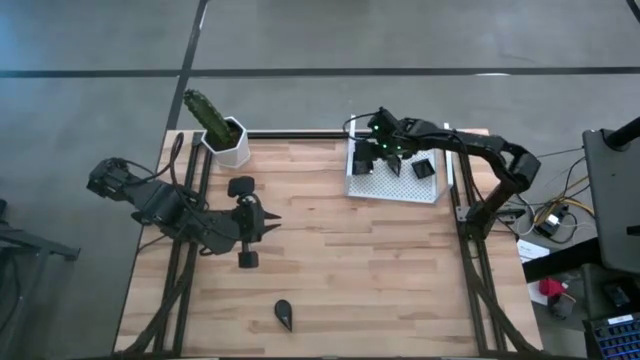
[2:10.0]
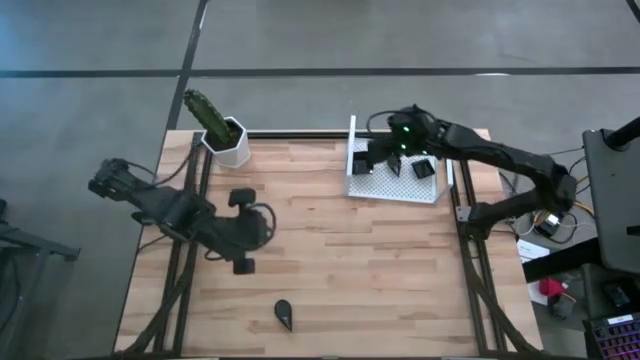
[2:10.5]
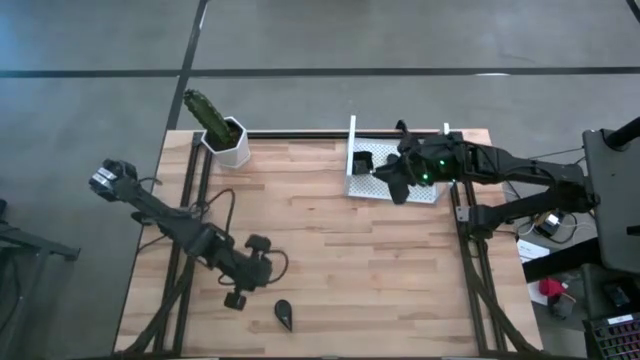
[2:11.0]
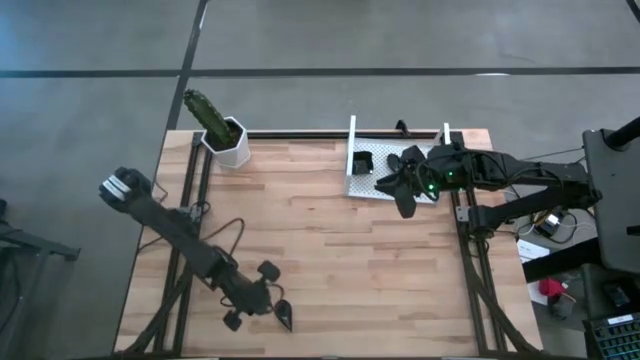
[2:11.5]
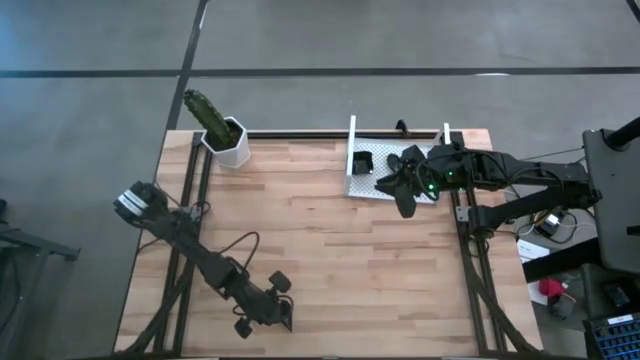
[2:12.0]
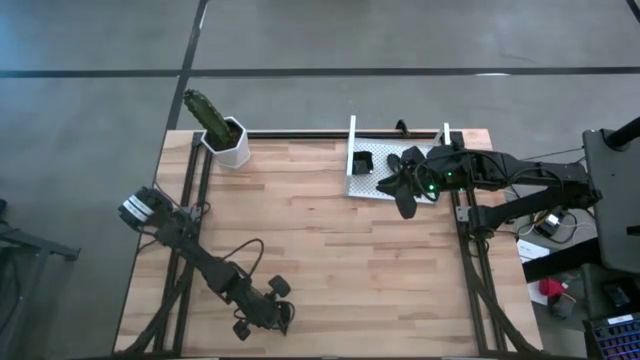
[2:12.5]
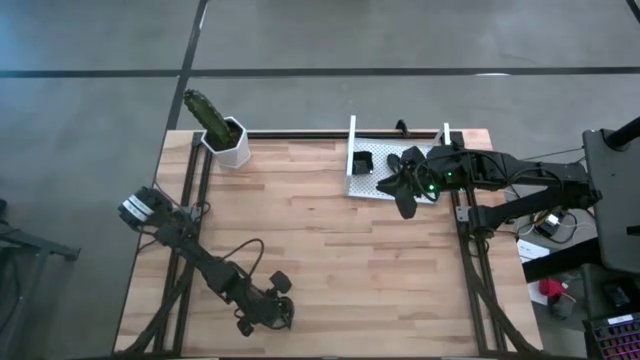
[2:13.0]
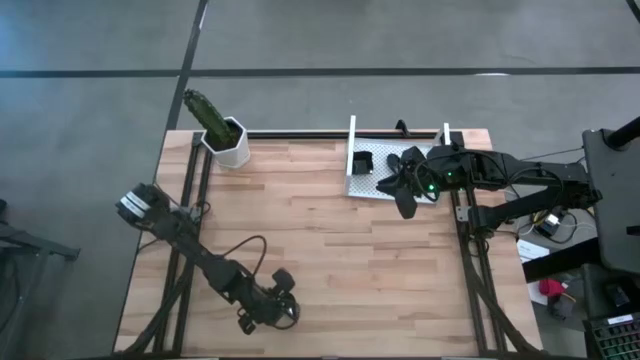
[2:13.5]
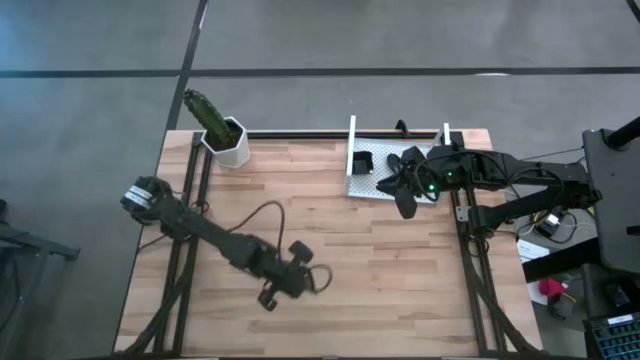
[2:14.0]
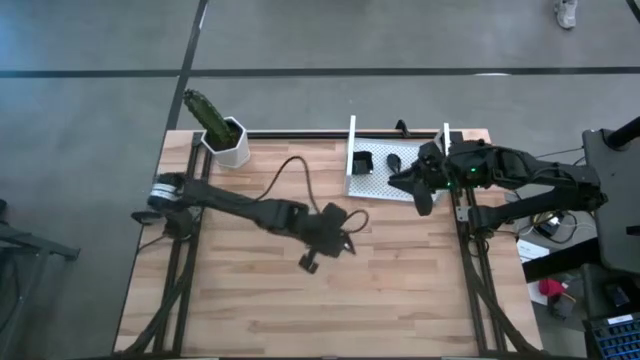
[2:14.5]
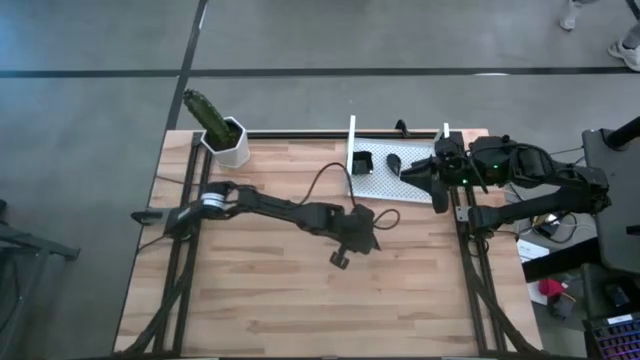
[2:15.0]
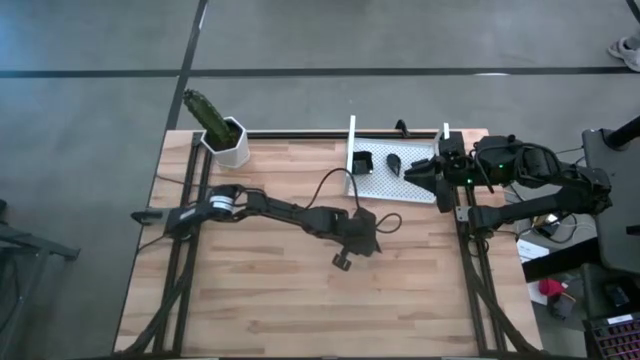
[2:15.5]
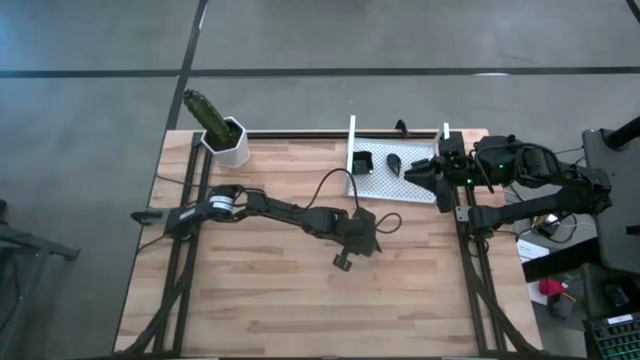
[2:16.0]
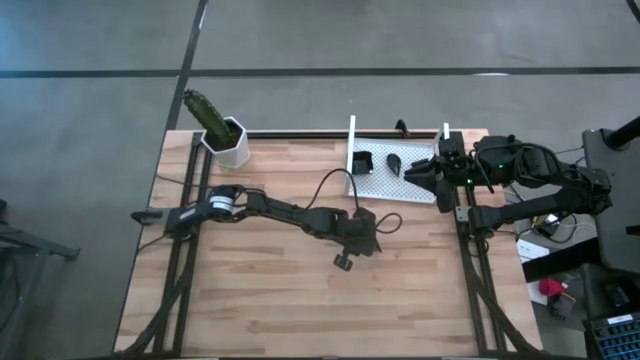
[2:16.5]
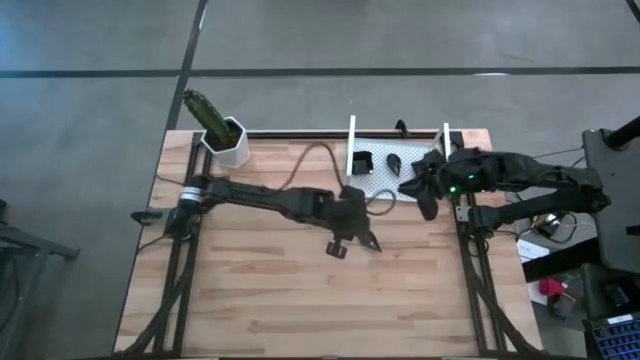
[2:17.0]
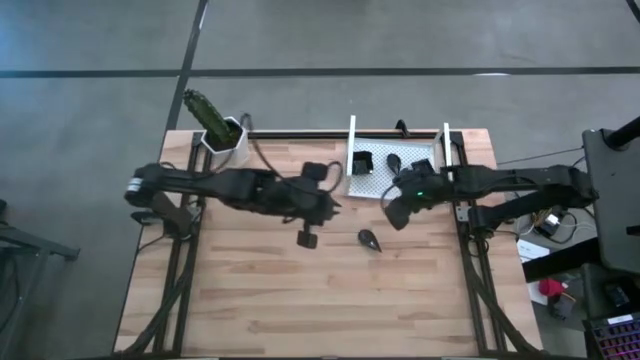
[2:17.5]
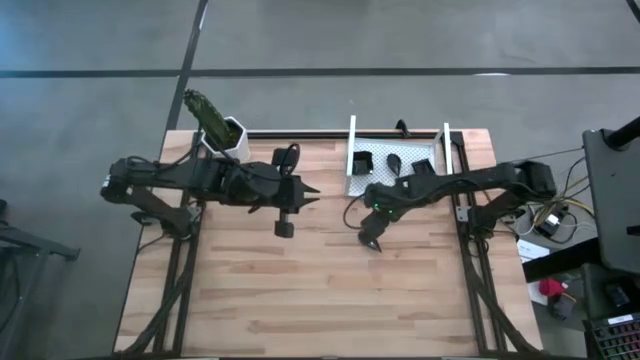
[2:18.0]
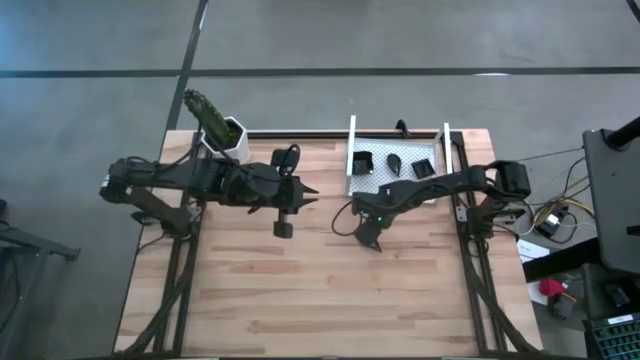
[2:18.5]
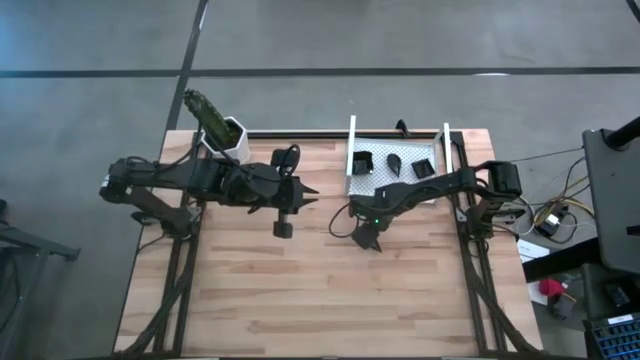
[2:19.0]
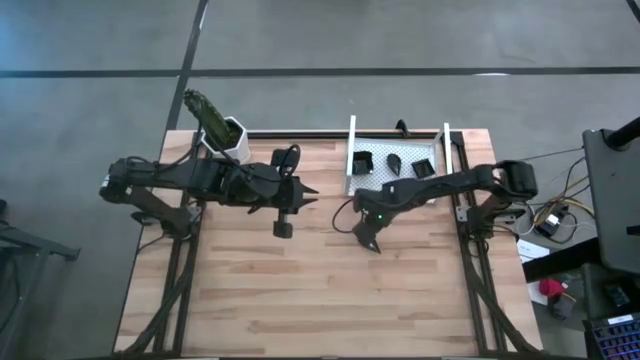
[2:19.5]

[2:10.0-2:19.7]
Task: Pick & Place Mini shaped plates
Stack the black drop shaped plate on top of the other black drop shaped plates on the shelf

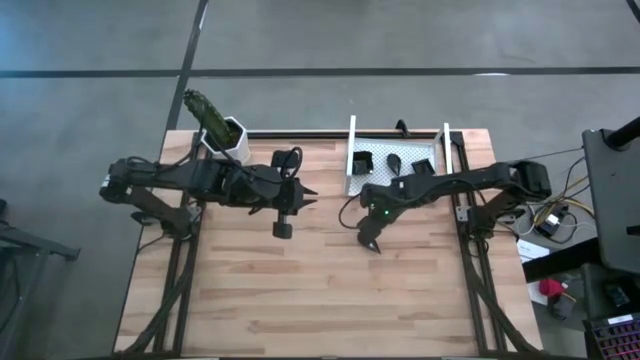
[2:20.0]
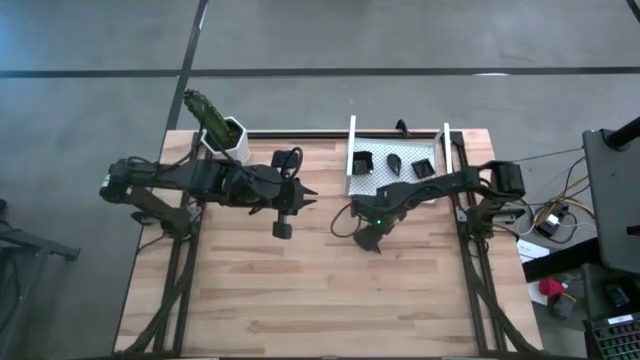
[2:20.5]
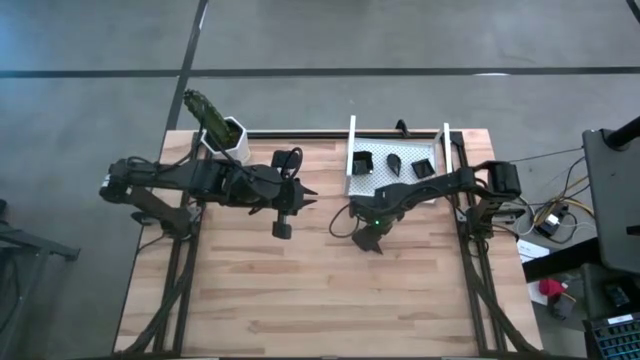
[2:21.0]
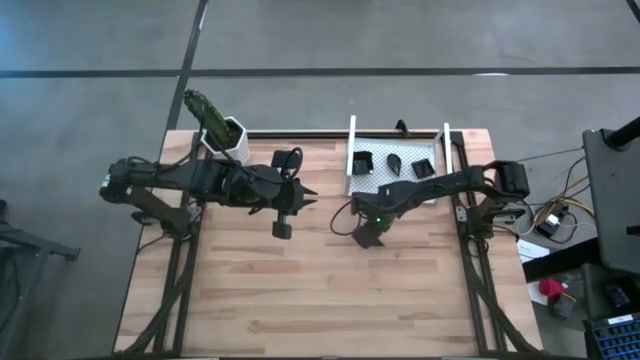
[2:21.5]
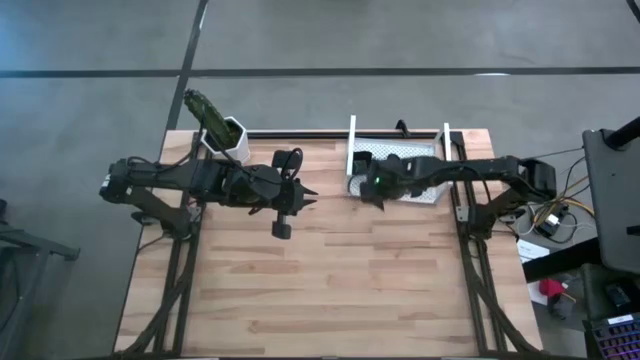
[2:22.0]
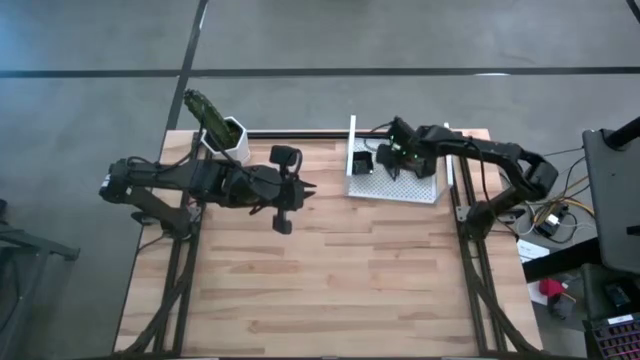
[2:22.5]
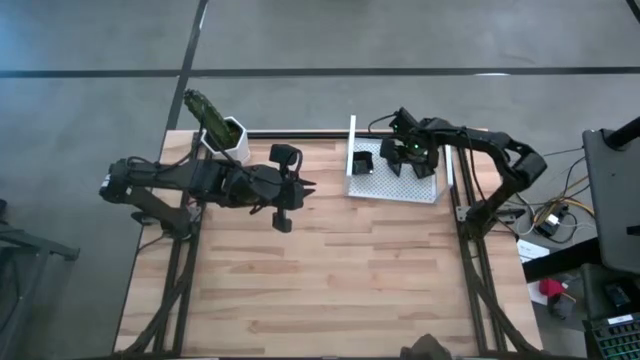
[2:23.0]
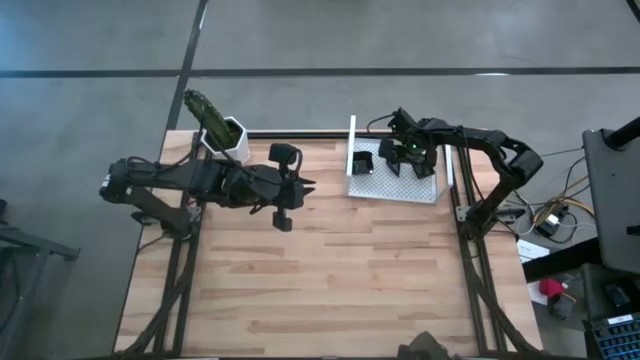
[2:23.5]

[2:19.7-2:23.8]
Stack the black drop shaped plate on top of the other black drop shaped plates on the shelf

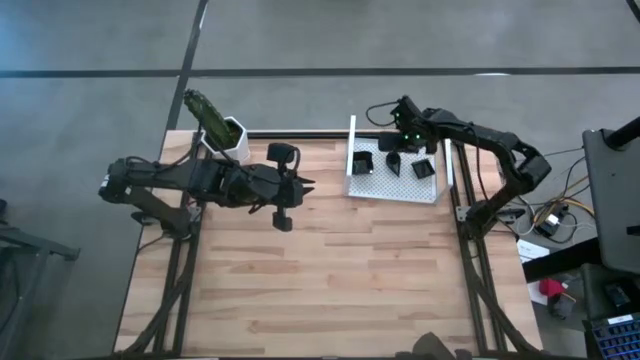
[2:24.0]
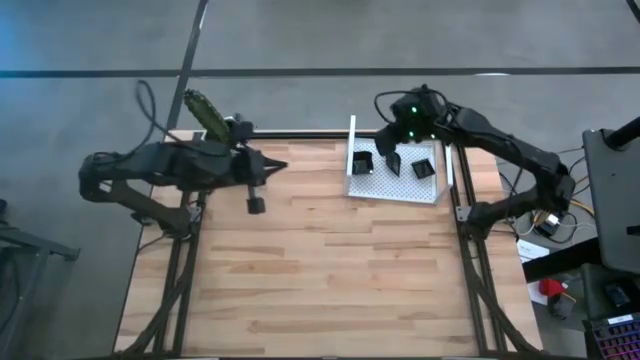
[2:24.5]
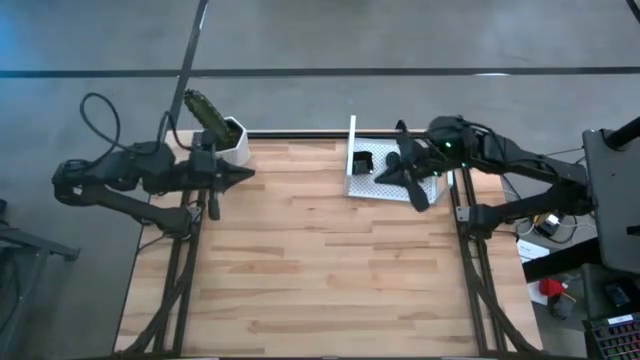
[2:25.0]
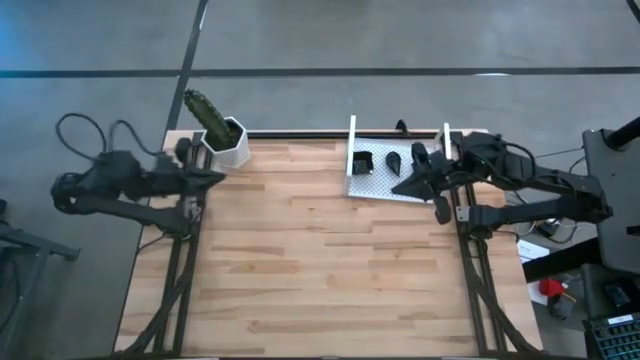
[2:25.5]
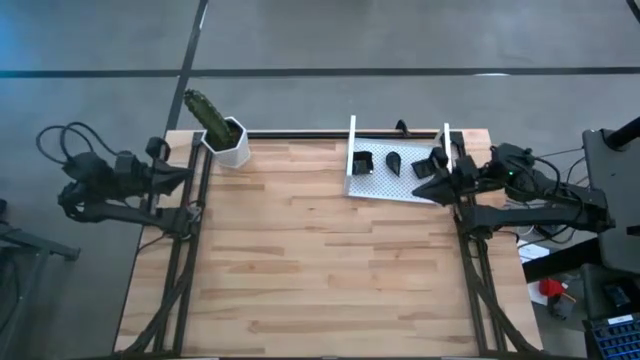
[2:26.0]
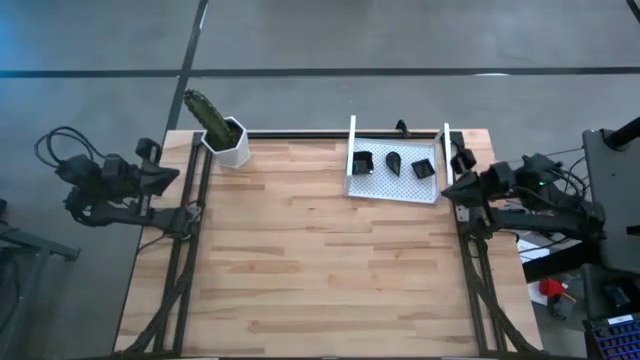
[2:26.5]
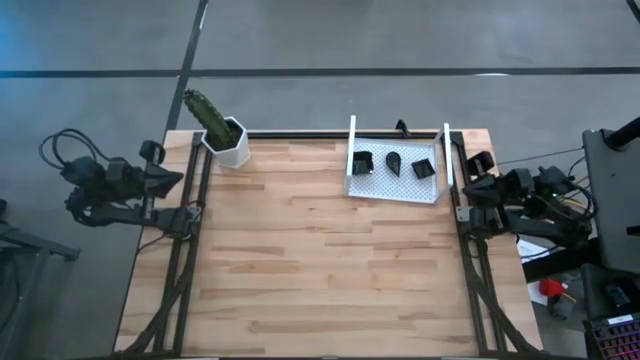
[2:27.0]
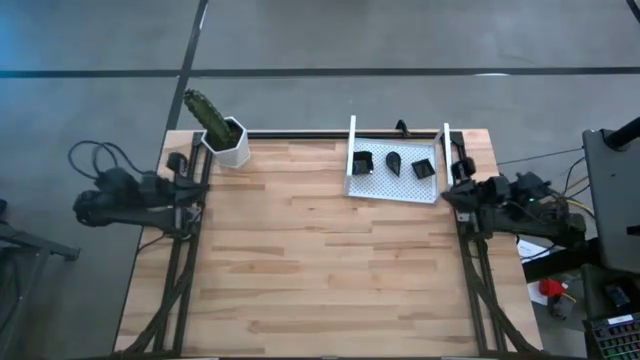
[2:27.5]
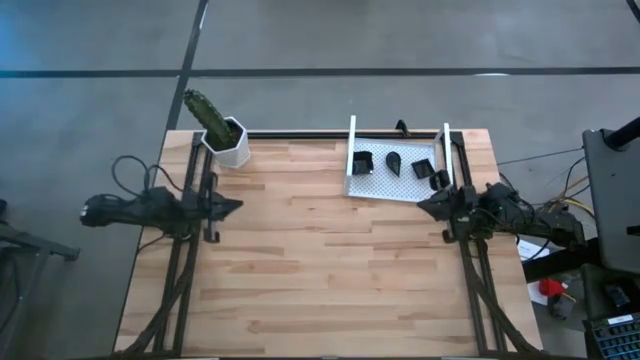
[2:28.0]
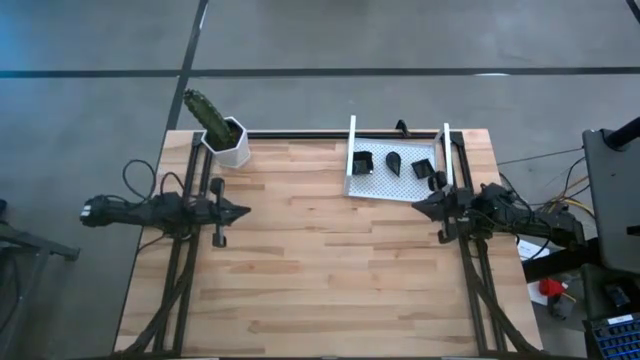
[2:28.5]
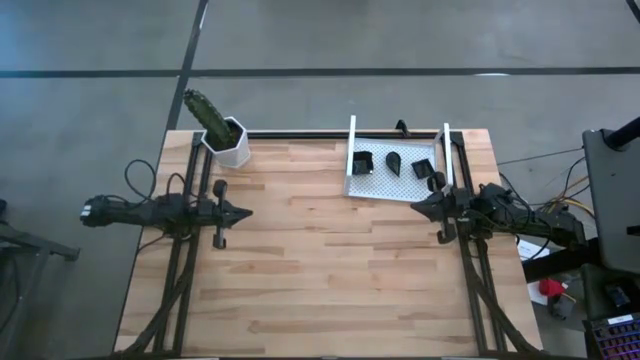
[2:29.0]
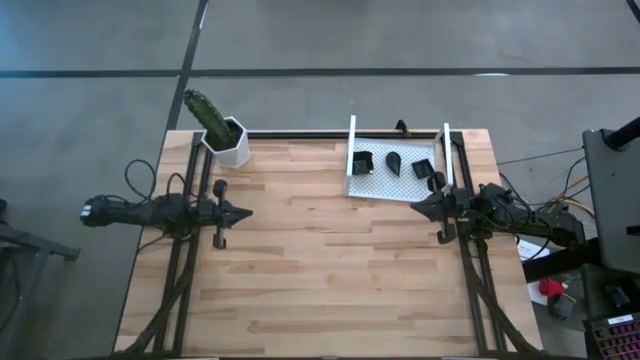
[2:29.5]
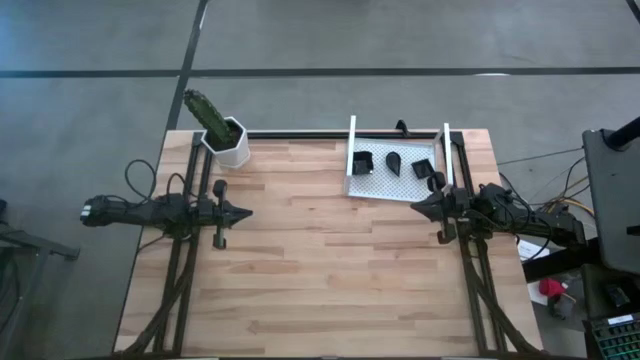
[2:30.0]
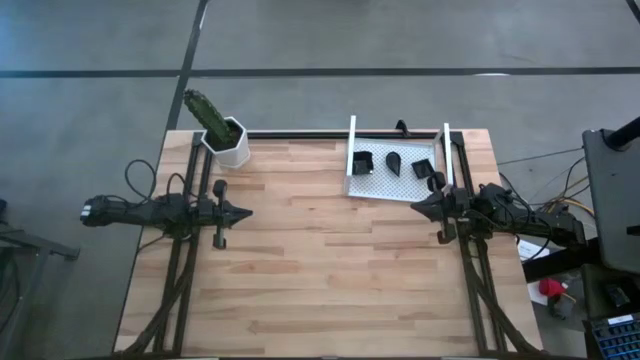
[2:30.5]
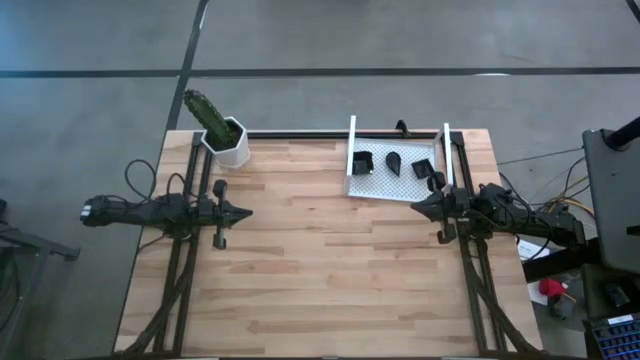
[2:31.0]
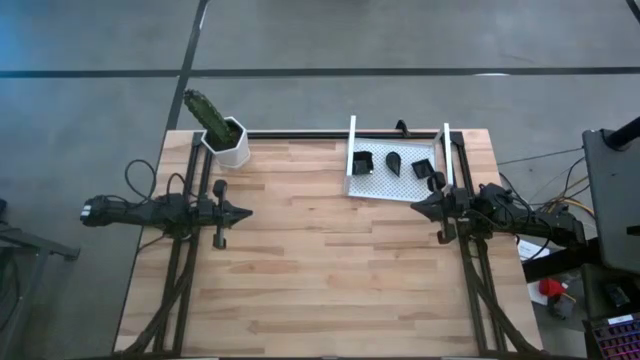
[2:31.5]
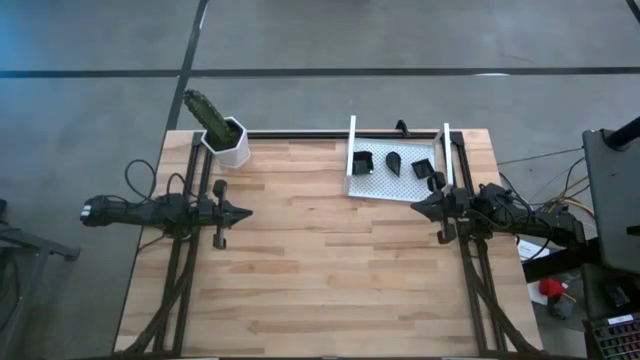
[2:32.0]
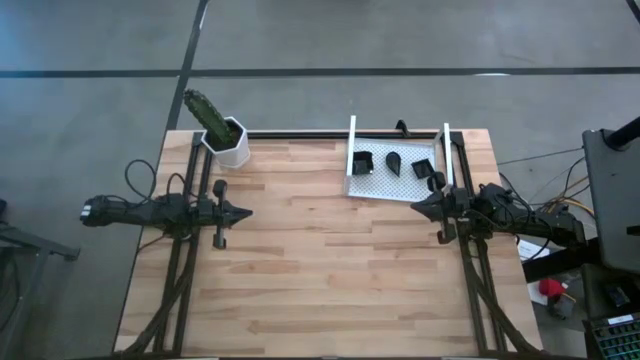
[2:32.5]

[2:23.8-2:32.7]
Return to Home Position
